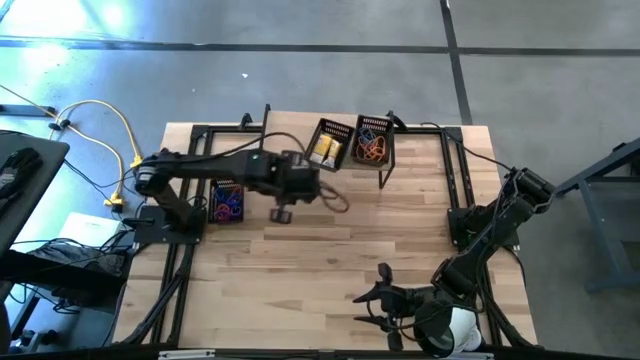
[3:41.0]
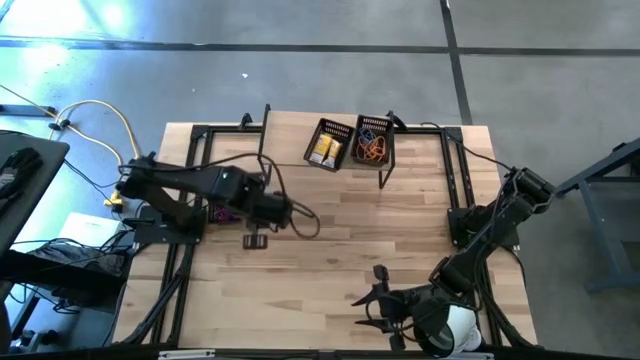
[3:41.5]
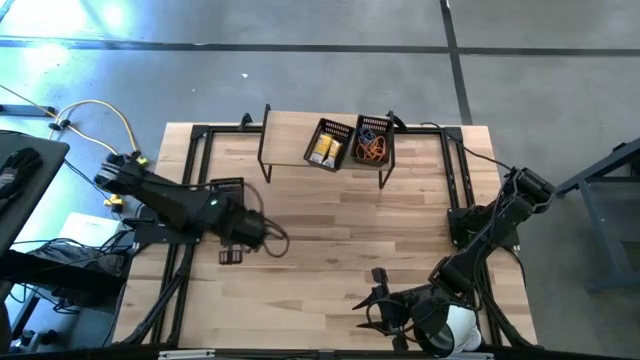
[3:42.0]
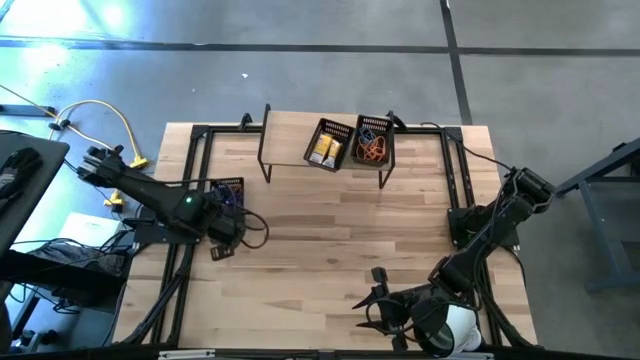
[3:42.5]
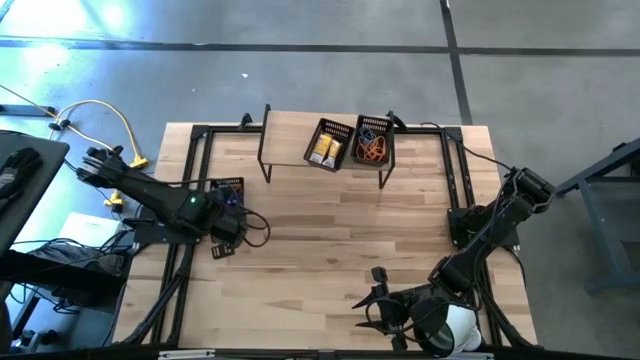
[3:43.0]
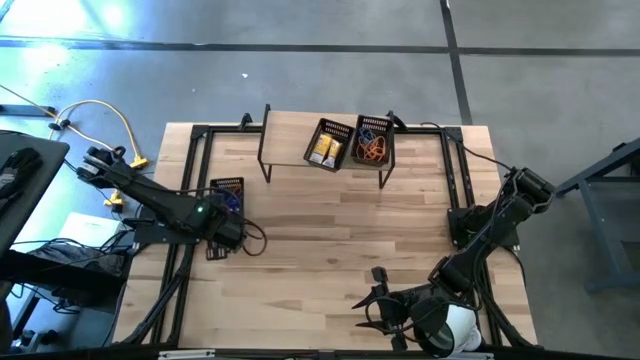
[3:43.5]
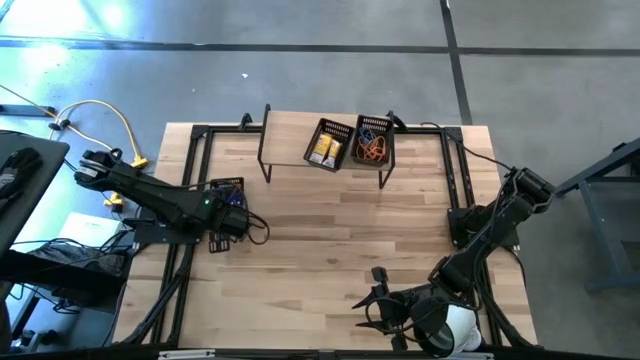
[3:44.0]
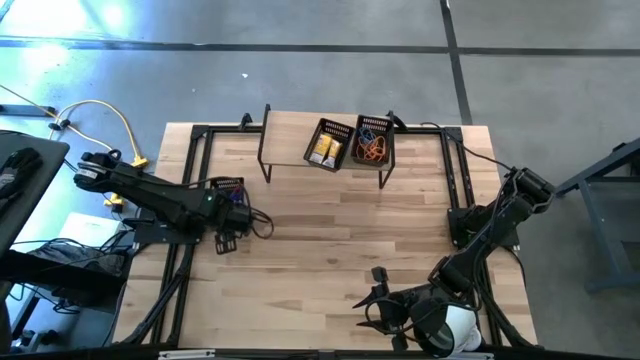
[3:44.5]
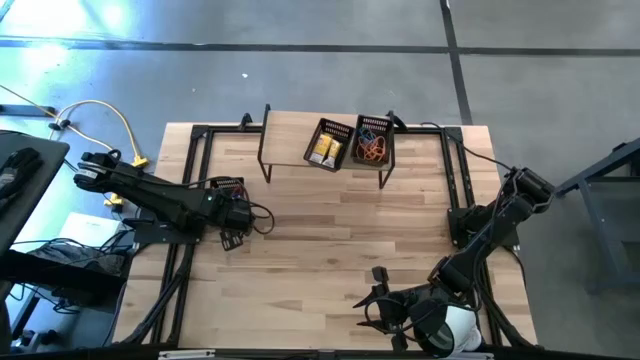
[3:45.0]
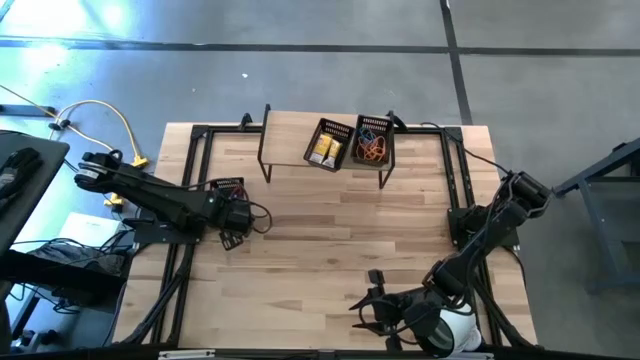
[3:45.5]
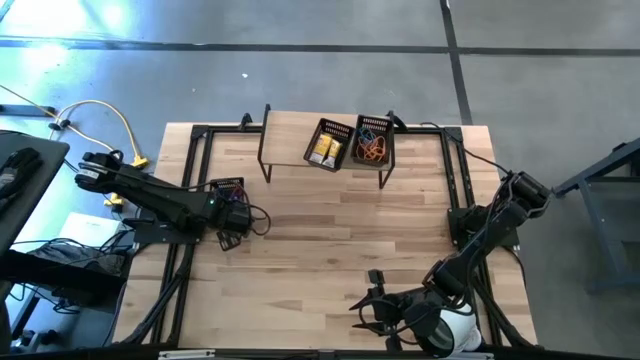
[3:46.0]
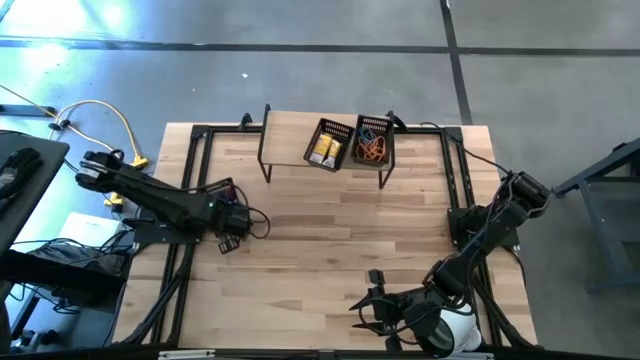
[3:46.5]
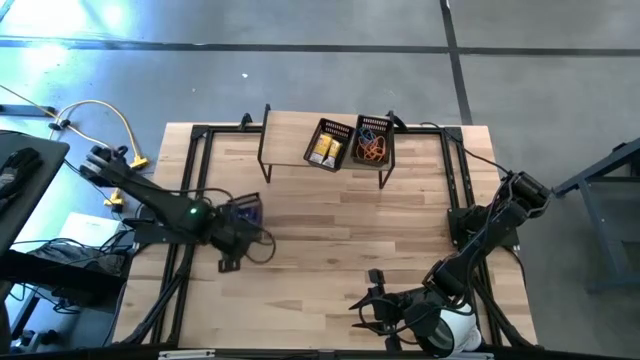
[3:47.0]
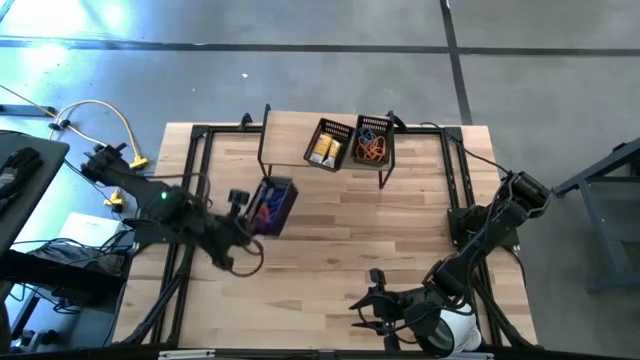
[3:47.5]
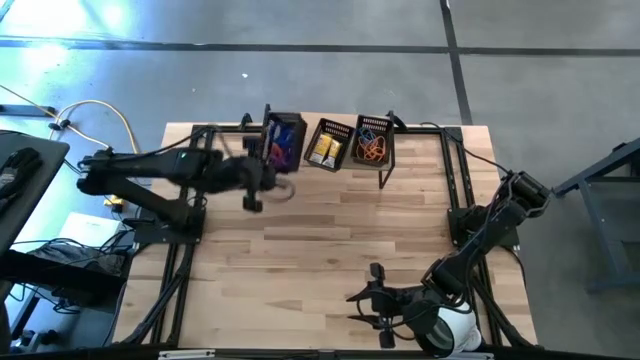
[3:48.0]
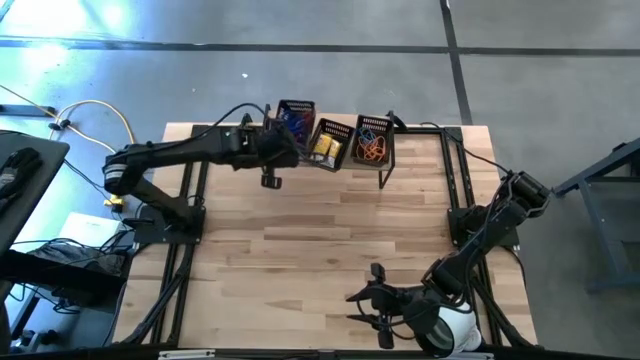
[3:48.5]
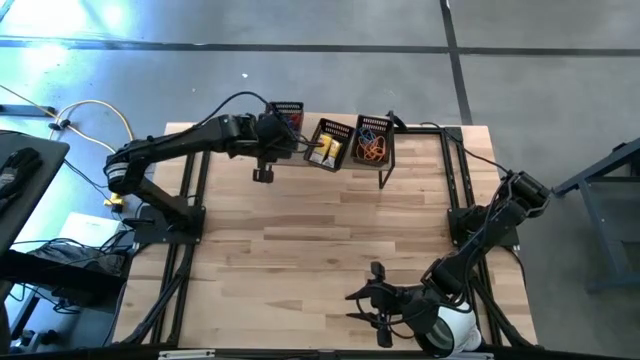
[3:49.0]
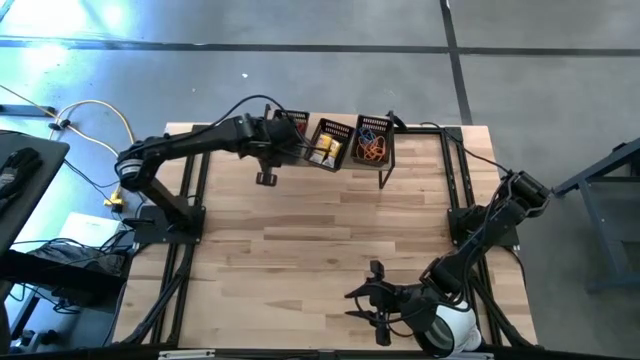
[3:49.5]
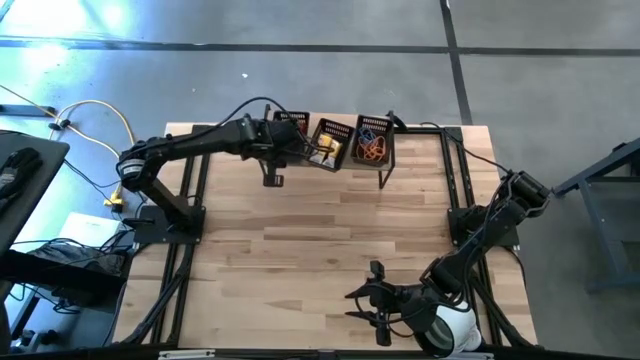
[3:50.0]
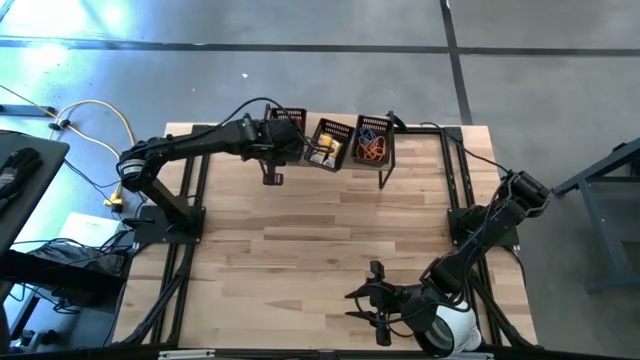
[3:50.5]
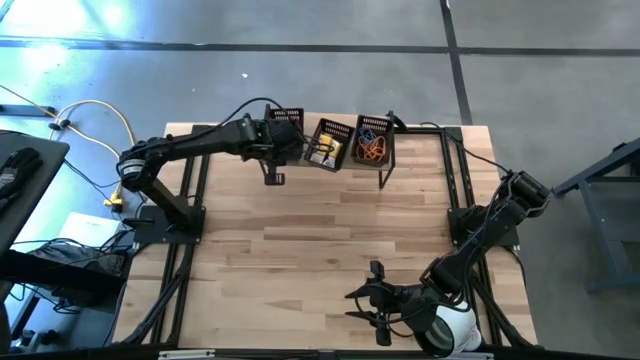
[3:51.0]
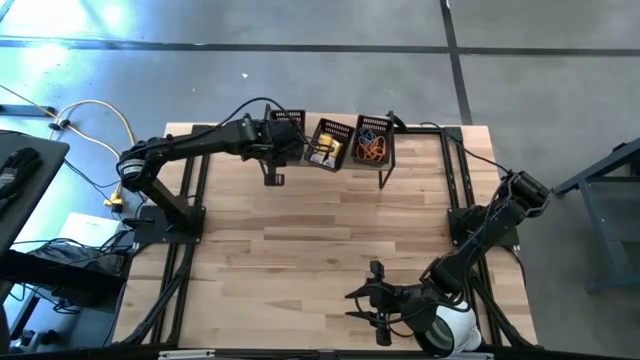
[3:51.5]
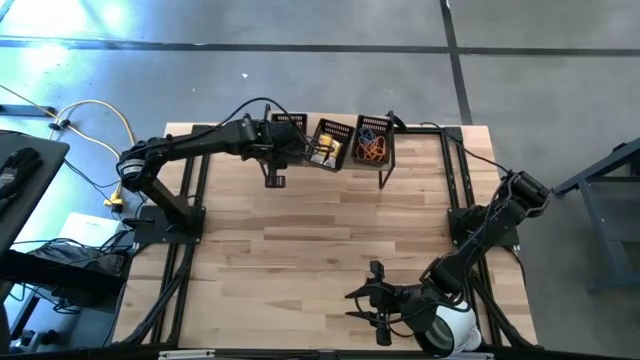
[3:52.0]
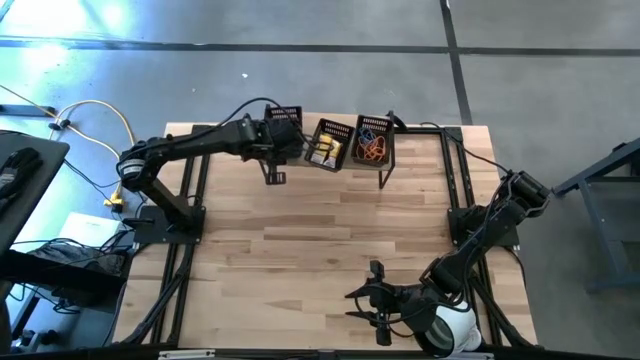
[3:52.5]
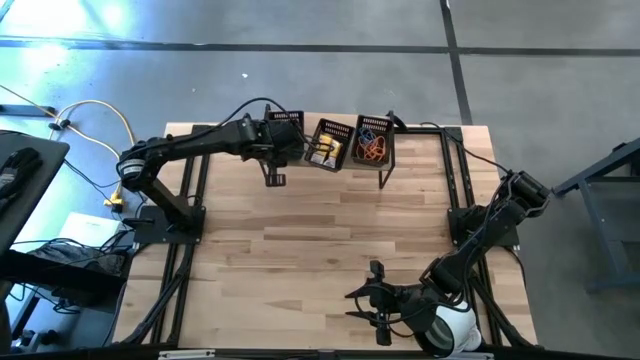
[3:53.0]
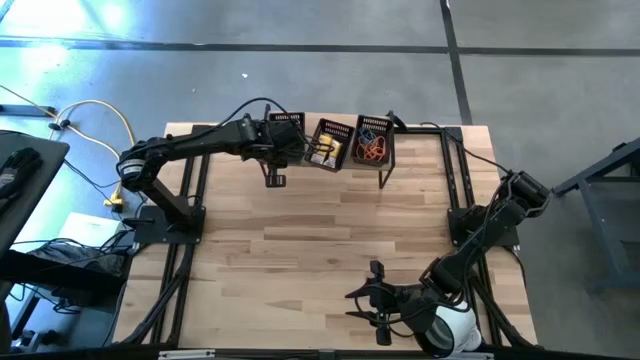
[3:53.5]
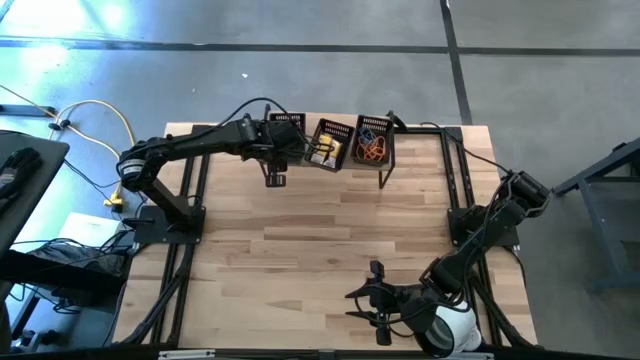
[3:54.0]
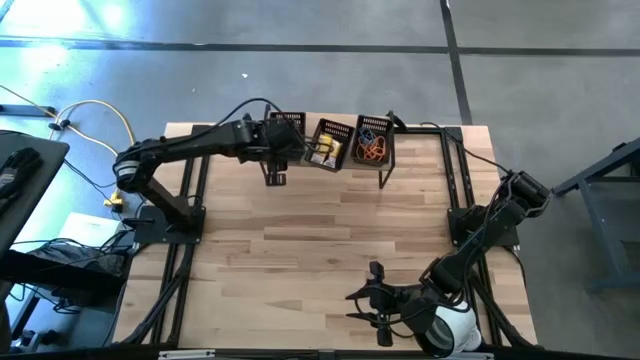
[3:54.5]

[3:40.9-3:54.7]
Task: Pick & Place Office Desk Supplies
Put the black bin on the shelf

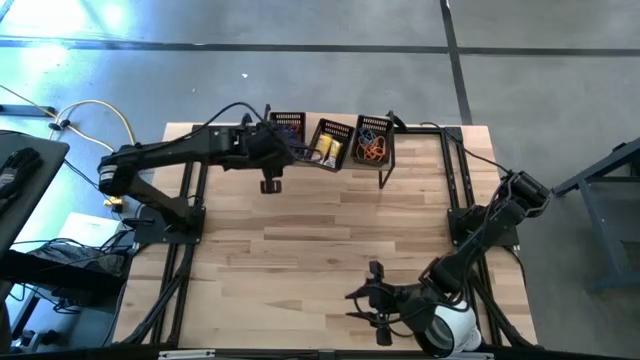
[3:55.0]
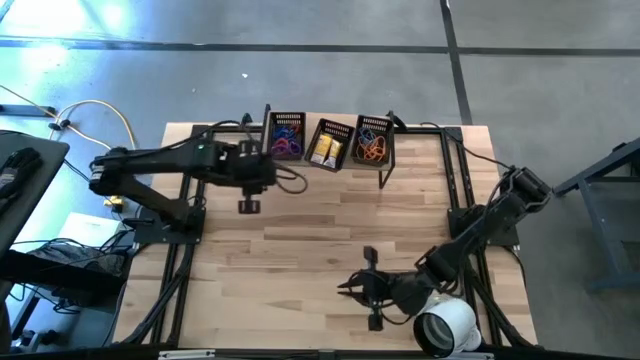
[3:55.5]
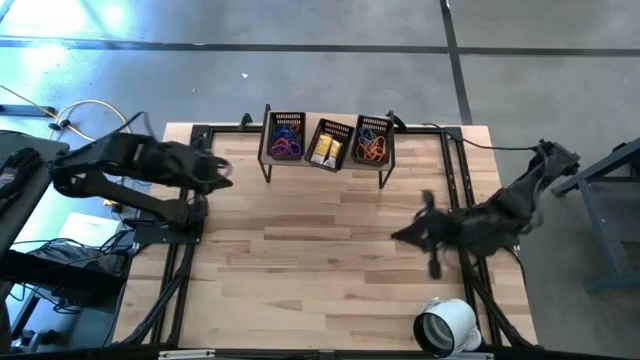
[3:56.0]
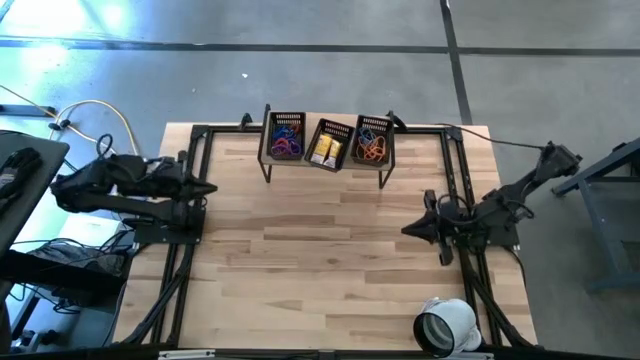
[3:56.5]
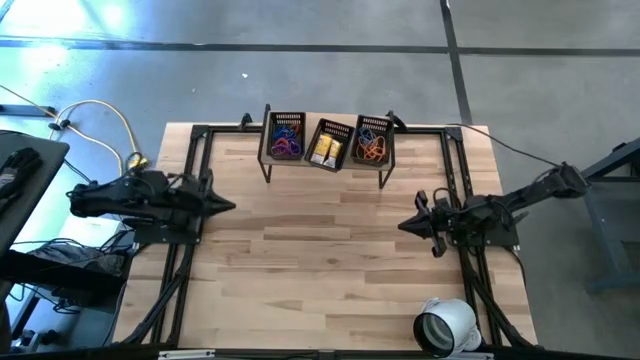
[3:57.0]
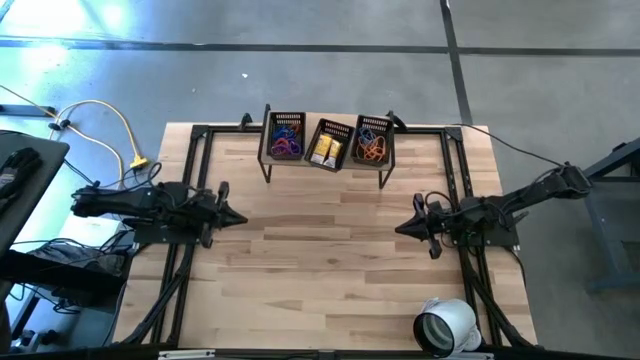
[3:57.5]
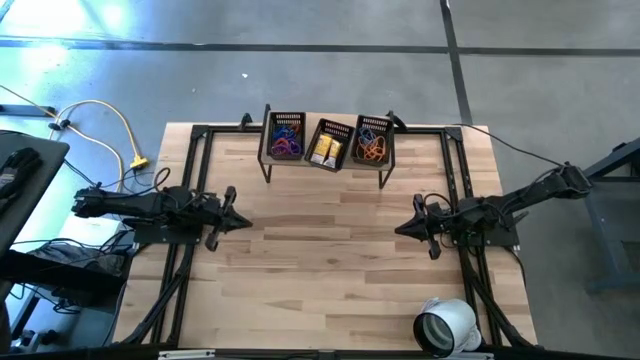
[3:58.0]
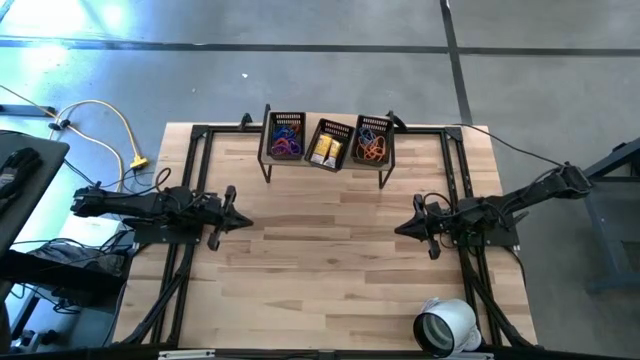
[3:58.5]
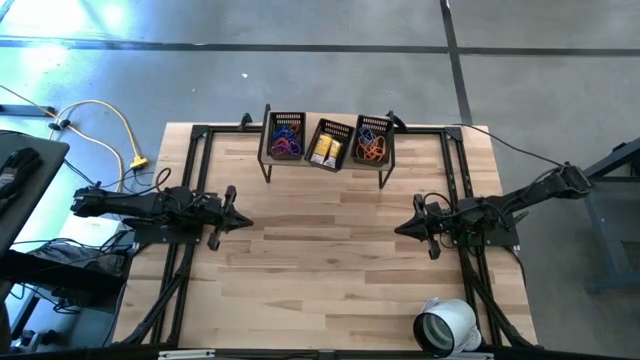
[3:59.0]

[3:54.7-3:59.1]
Return to Home Position

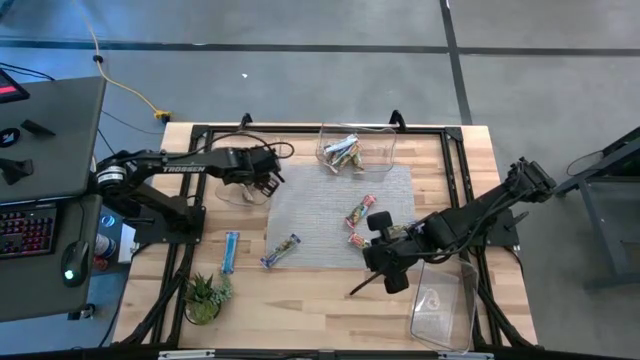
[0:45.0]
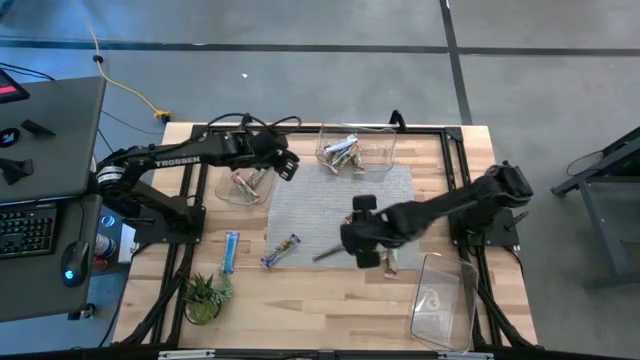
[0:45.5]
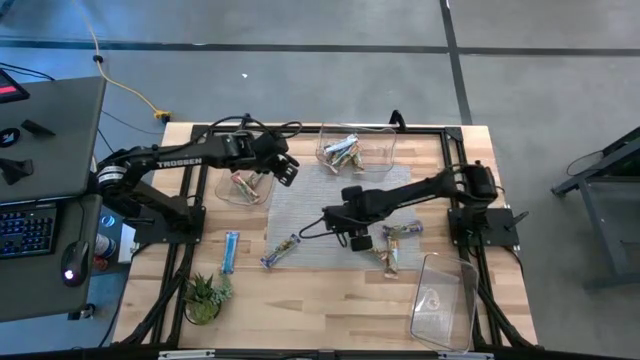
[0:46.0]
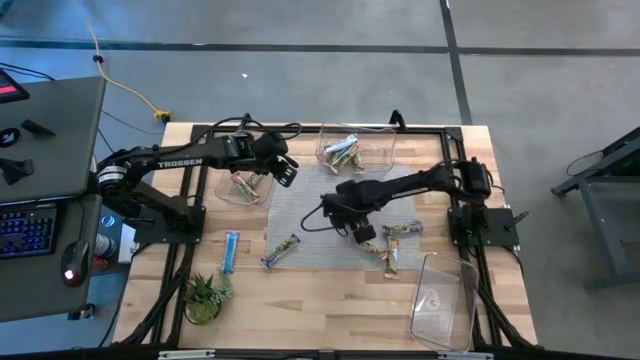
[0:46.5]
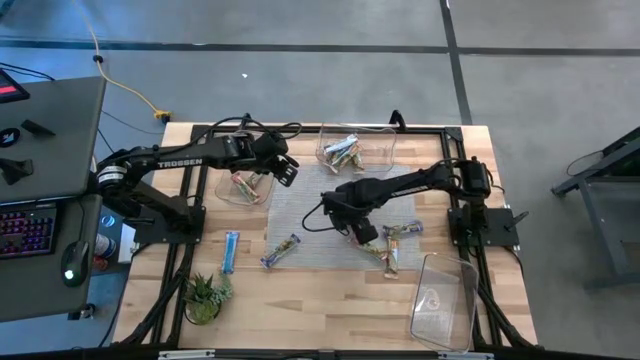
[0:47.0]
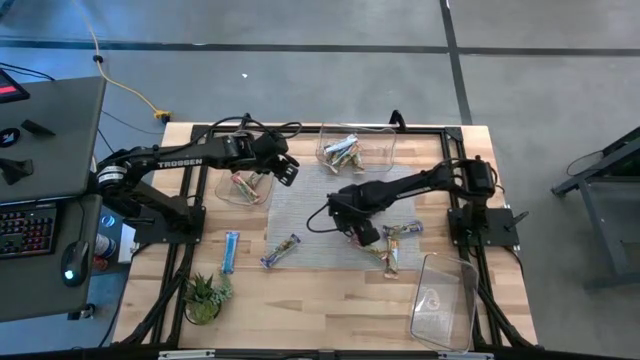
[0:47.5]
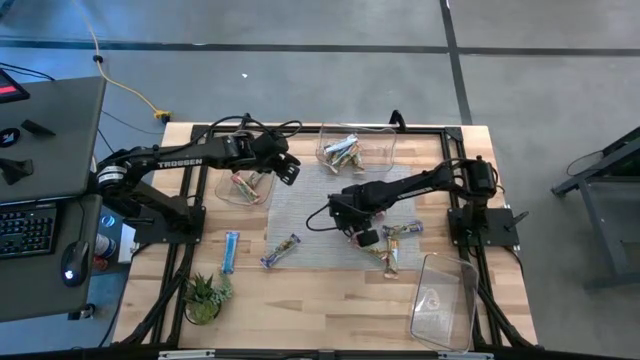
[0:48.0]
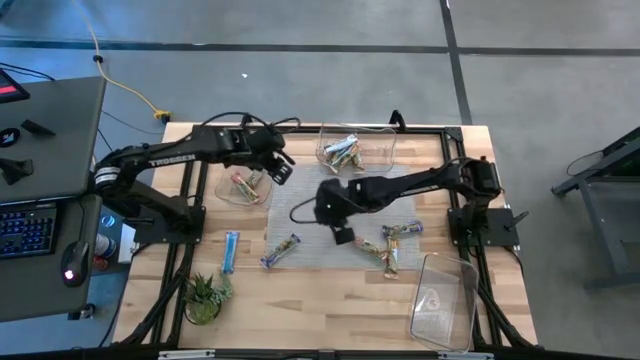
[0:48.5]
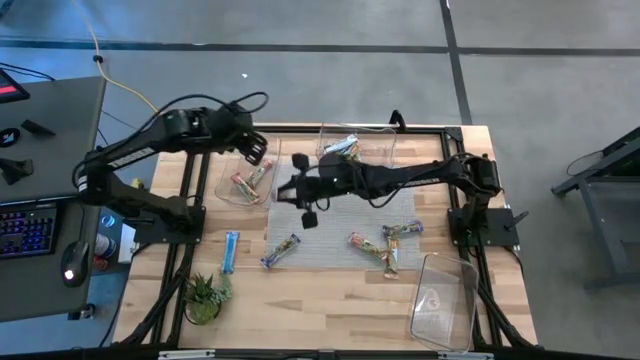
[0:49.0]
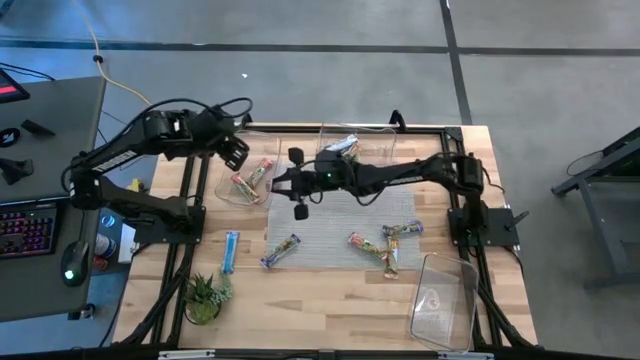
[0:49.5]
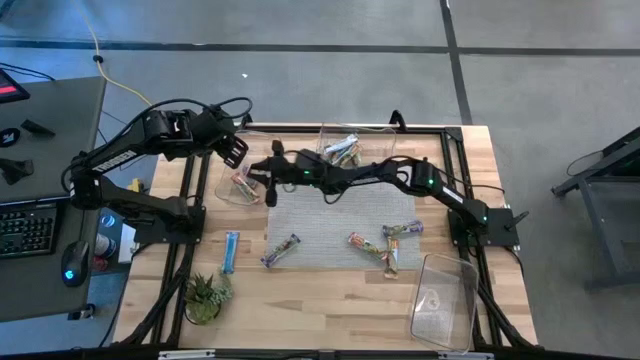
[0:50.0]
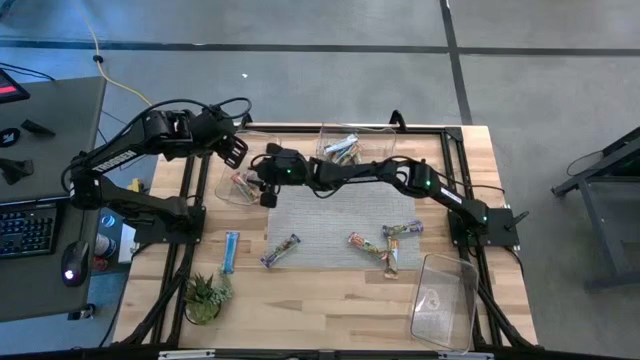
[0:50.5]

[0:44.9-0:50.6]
Task: Pick and place Granola Bars by type
Put the red granola bar into the top left transparent bin
